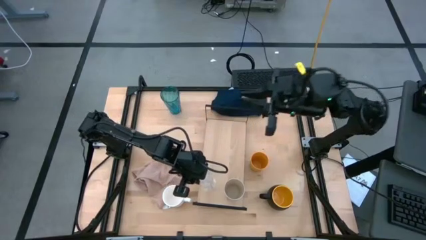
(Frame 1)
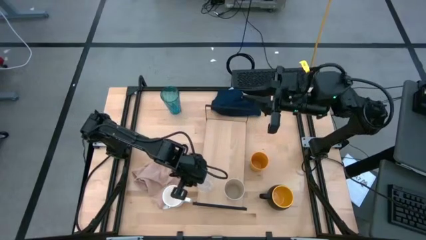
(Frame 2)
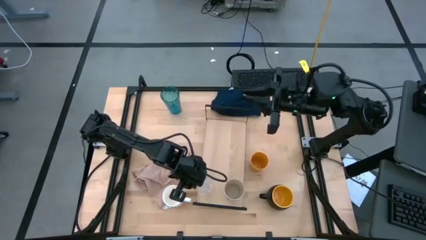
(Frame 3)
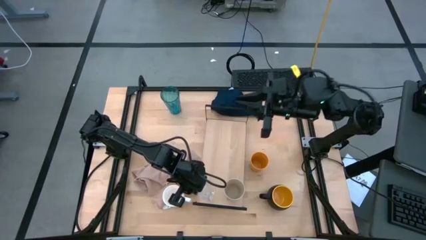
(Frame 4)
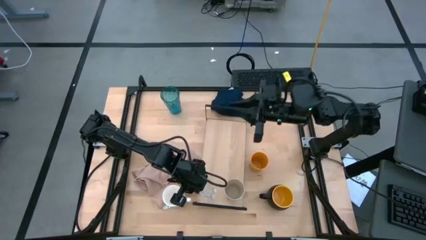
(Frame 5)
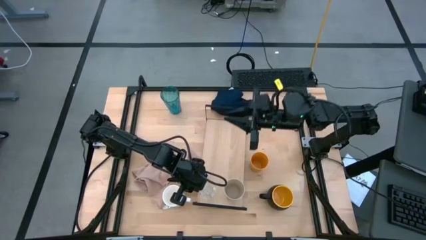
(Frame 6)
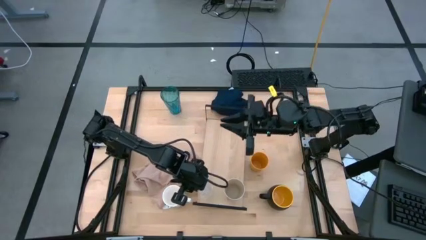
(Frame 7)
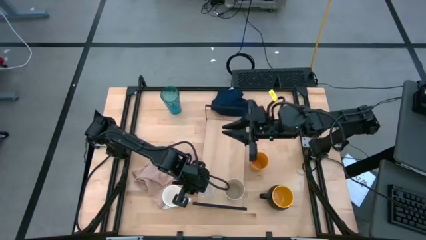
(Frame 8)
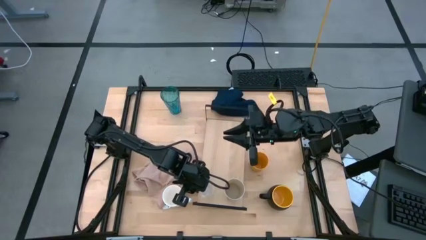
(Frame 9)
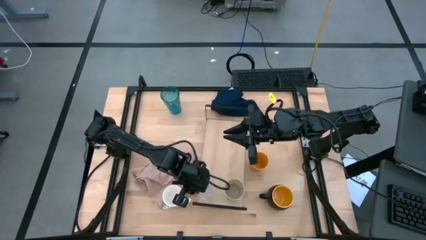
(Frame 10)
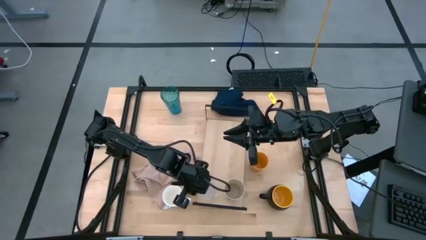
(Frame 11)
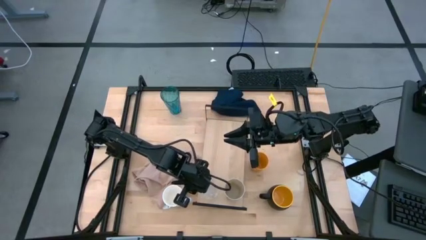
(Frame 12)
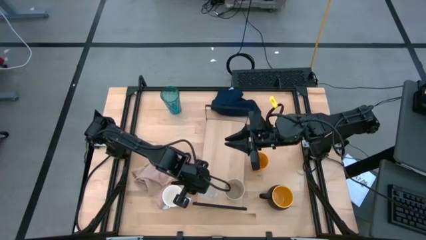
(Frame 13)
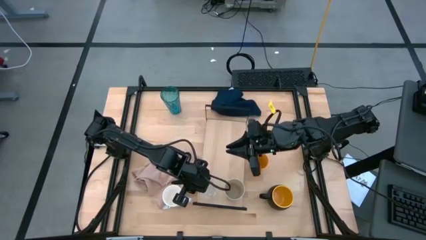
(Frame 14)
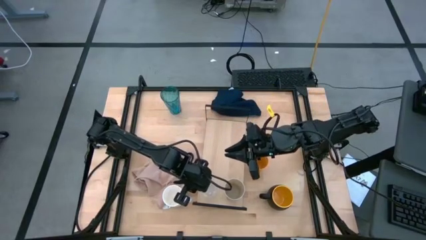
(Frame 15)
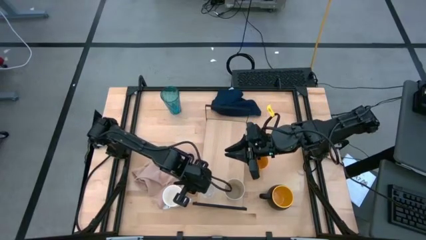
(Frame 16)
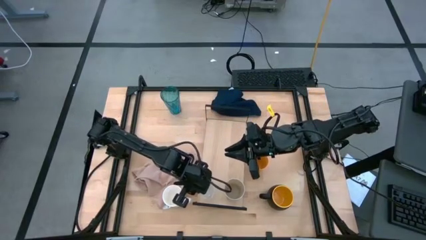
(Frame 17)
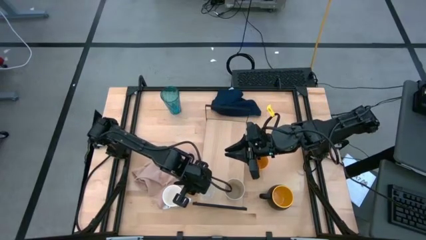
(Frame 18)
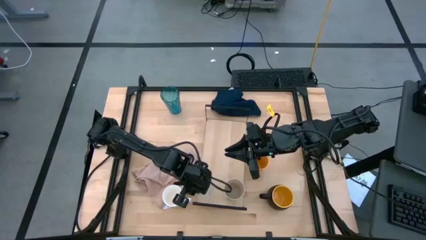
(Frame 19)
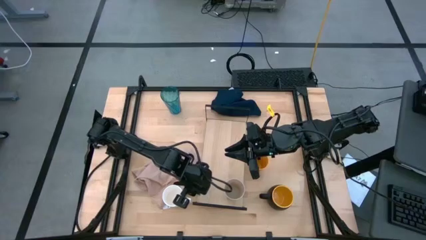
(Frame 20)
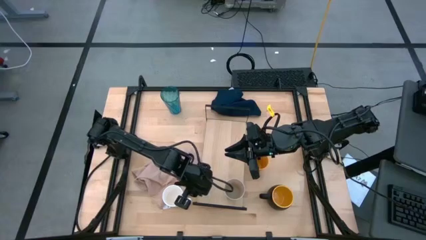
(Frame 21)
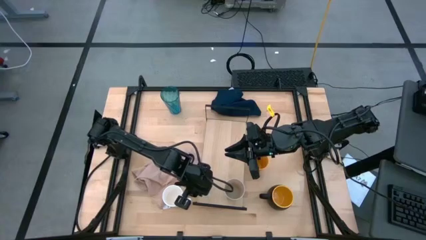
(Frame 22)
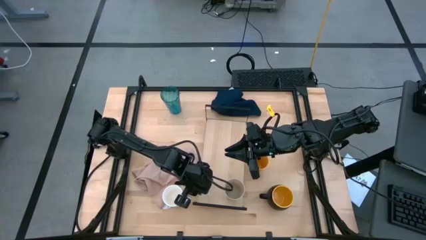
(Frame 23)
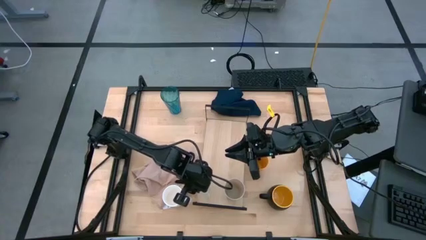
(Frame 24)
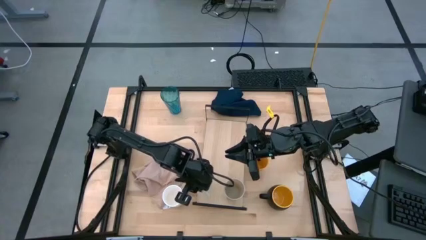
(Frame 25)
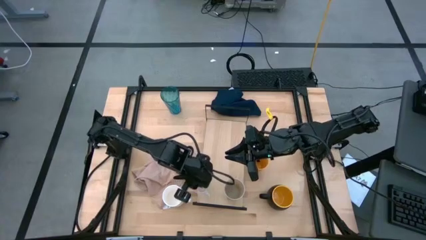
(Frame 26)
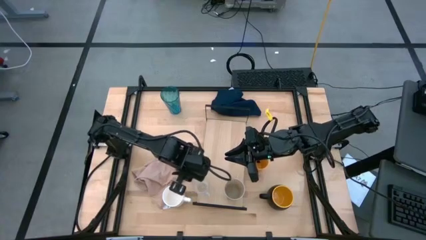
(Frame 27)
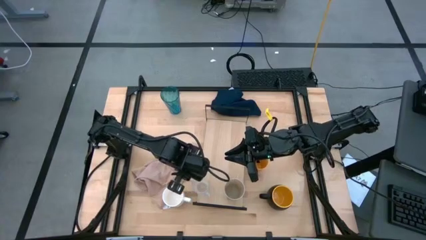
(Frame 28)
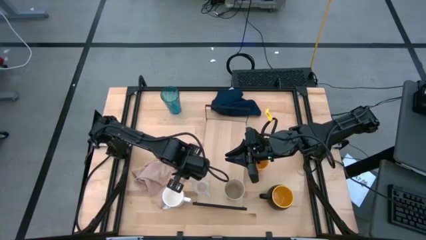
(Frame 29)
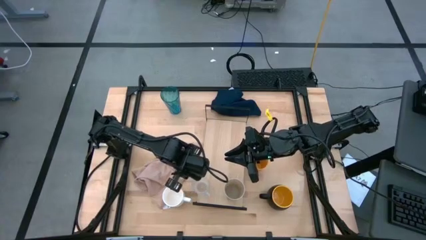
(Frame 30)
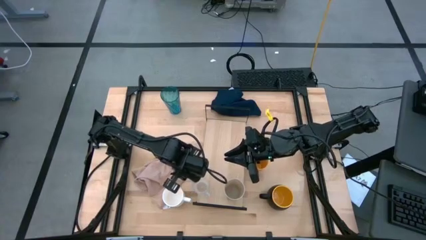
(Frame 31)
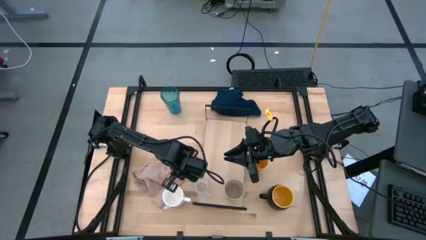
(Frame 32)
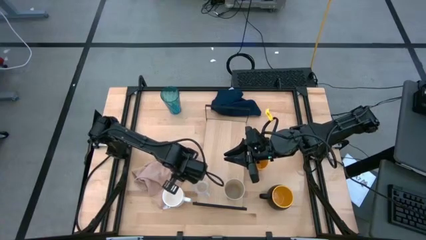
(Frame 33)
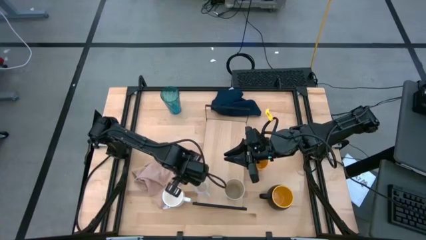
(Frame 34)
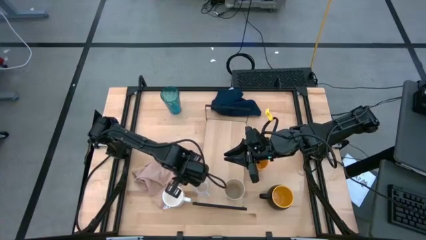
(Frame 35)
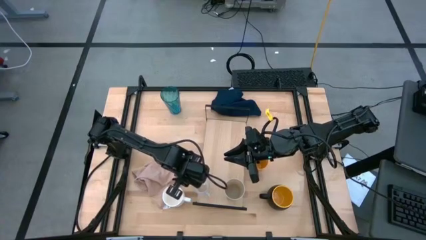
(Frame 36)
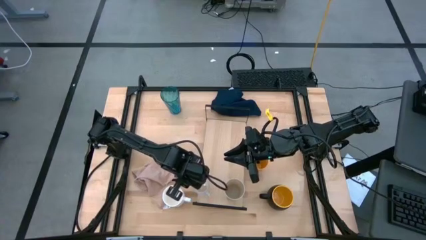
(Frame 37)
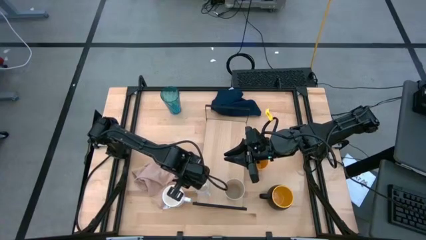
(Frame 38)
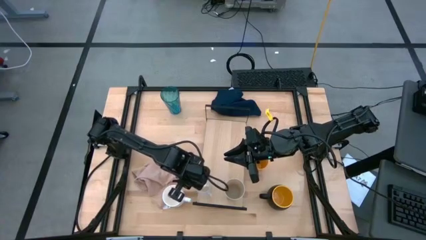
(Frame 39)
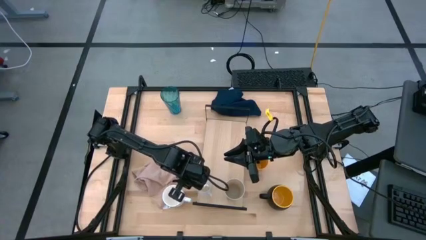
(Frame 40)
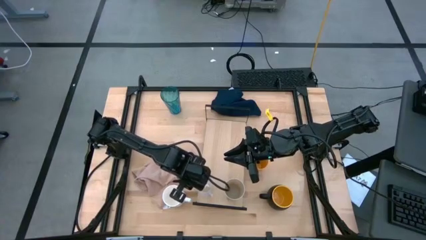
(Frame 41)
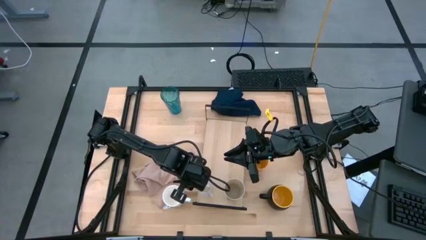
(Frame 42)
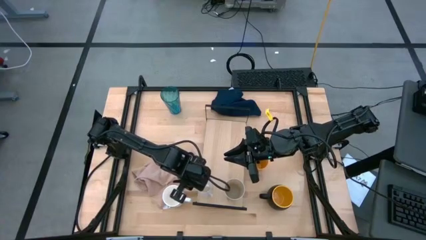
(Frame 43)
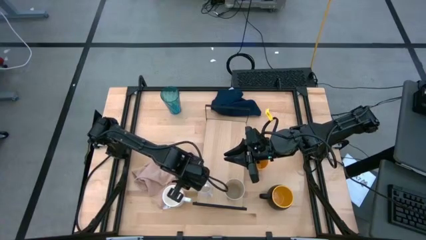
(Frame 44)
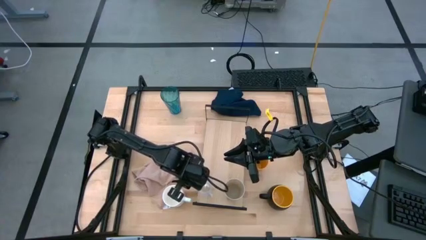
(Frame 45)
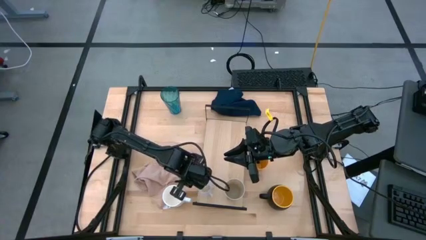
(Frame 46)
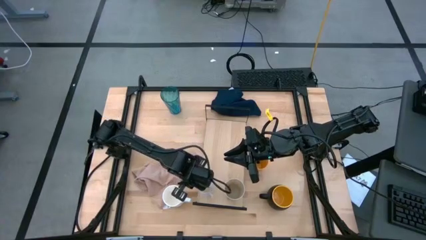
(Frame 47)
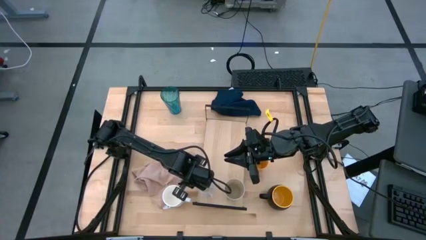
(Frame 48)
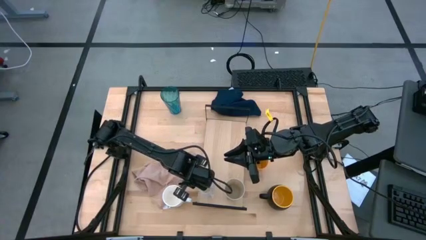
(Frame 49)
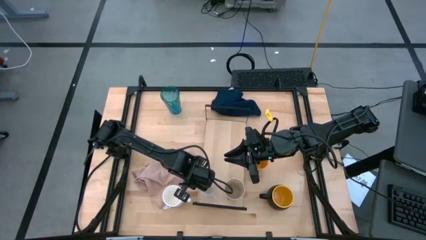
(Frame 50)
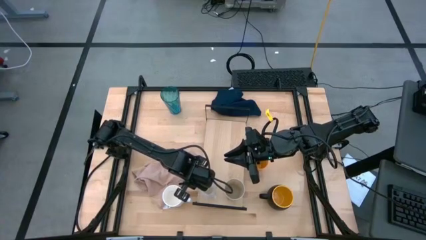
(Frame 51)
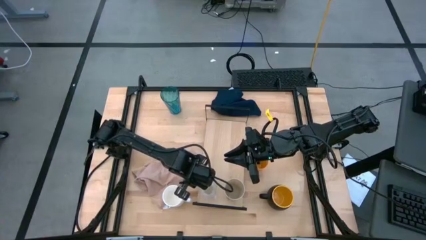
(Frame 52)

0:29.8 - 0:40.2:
Task: Stack small to large cups/mugs on shelf
Put the transparent cup on the shelf

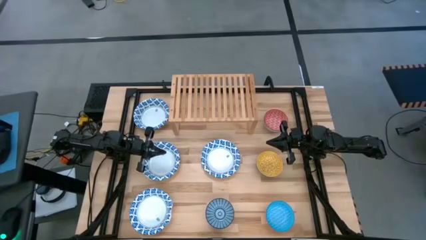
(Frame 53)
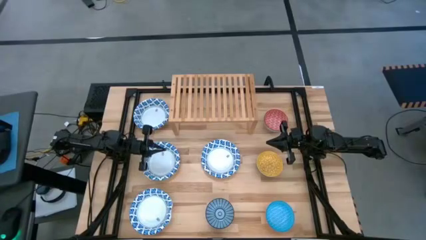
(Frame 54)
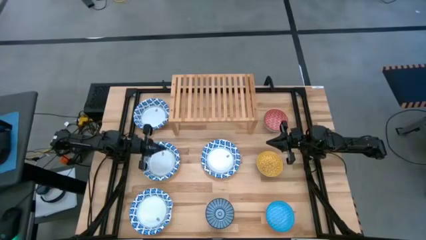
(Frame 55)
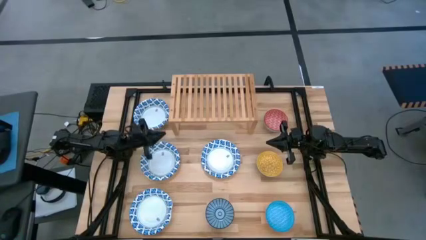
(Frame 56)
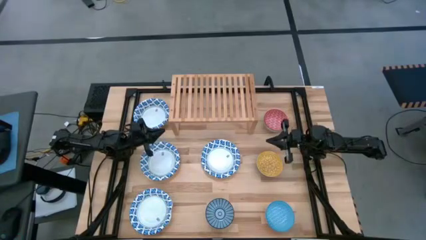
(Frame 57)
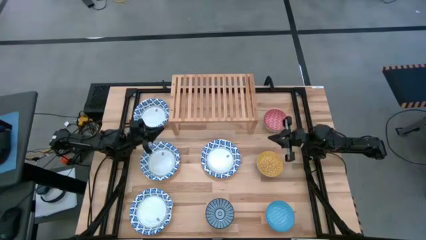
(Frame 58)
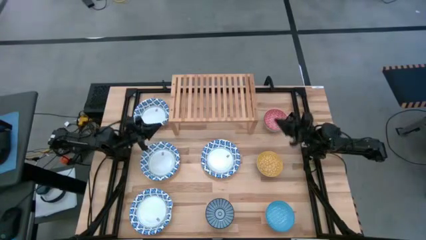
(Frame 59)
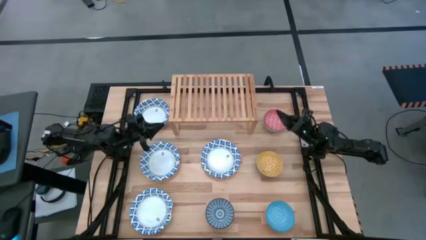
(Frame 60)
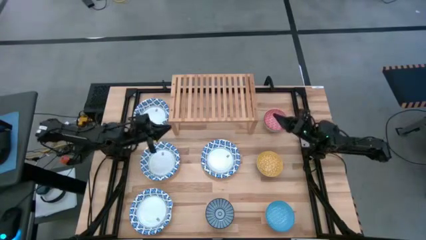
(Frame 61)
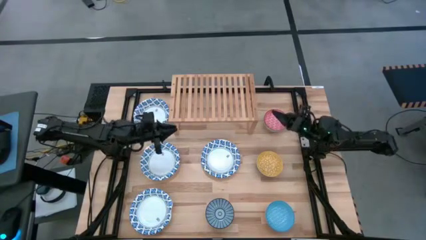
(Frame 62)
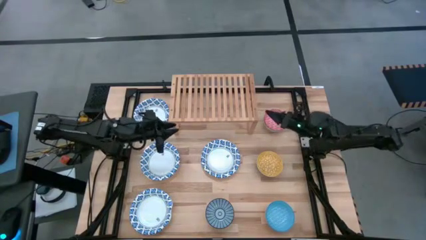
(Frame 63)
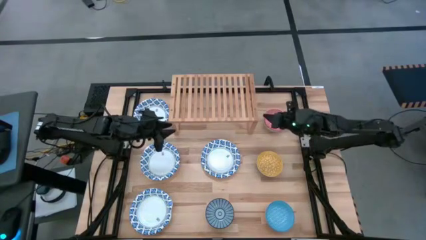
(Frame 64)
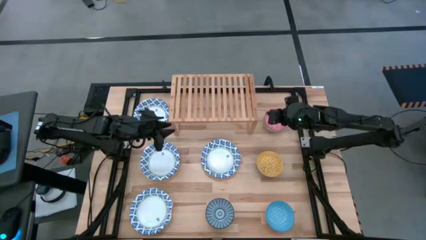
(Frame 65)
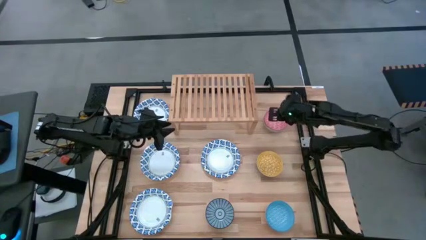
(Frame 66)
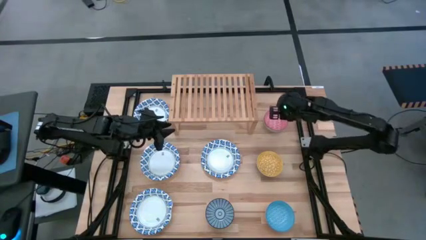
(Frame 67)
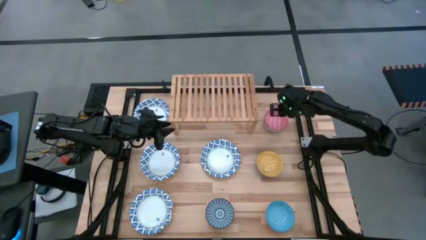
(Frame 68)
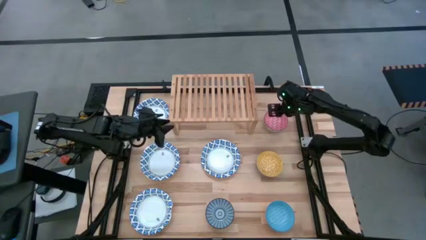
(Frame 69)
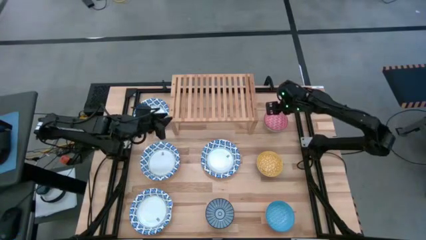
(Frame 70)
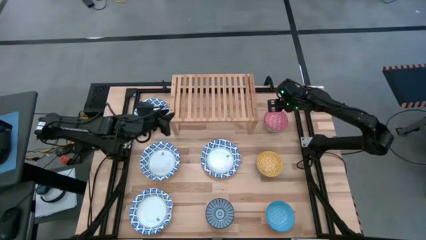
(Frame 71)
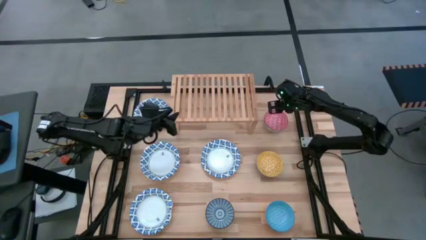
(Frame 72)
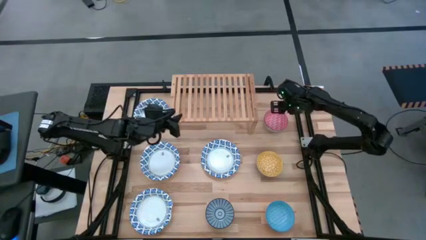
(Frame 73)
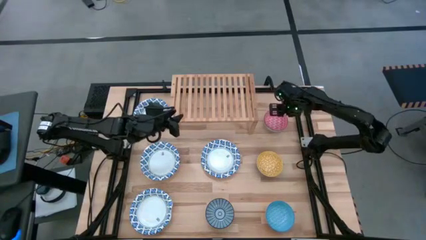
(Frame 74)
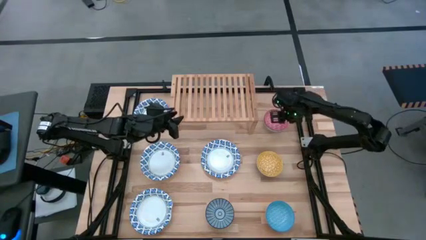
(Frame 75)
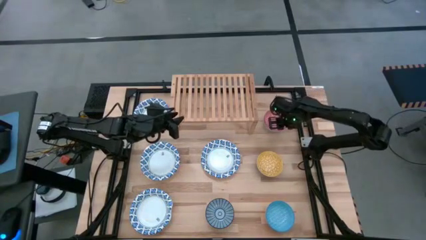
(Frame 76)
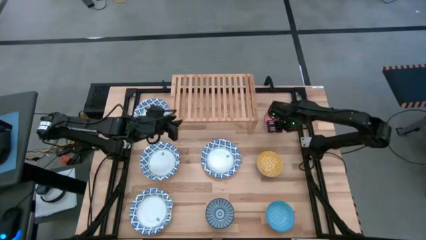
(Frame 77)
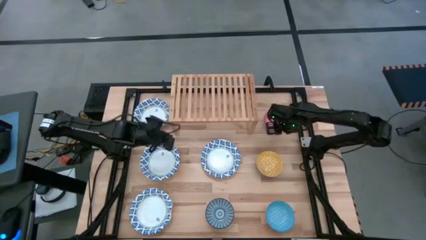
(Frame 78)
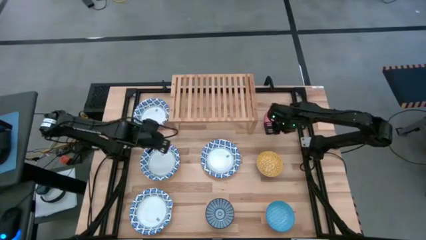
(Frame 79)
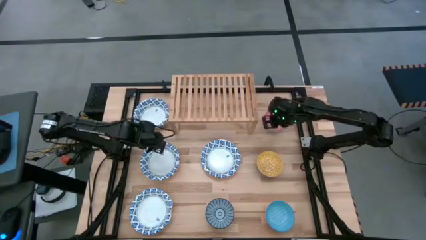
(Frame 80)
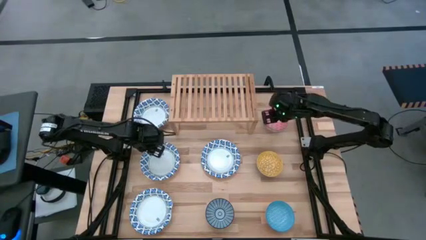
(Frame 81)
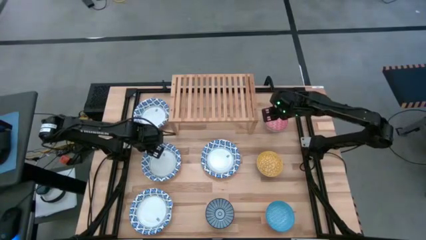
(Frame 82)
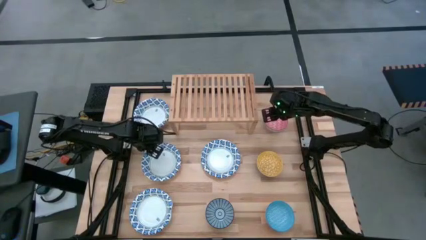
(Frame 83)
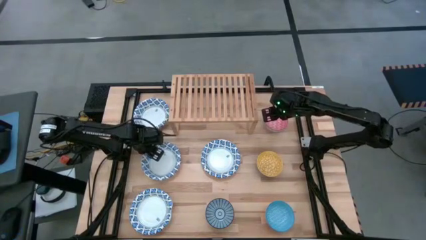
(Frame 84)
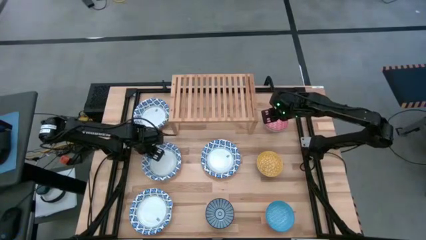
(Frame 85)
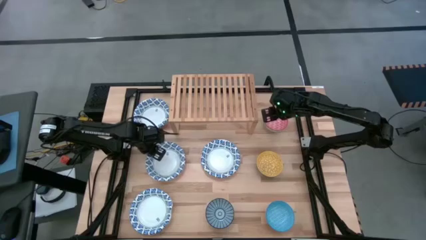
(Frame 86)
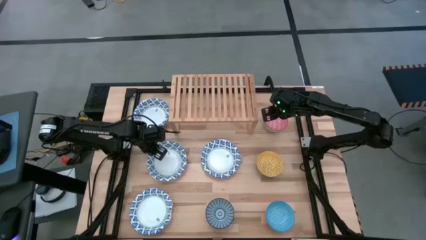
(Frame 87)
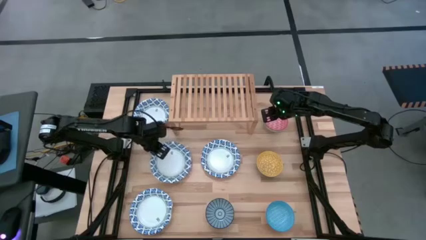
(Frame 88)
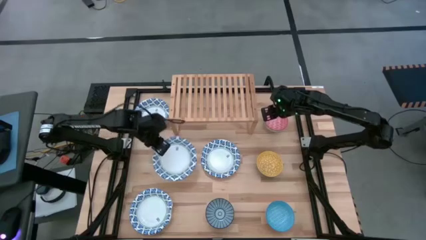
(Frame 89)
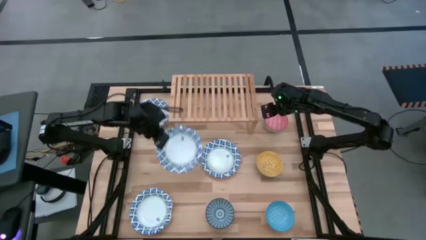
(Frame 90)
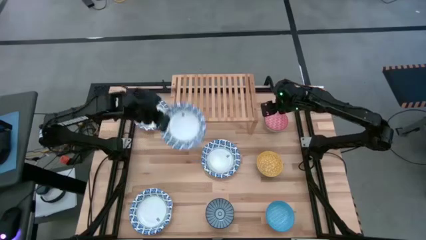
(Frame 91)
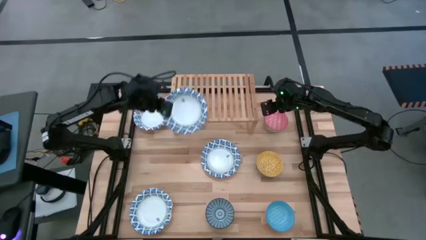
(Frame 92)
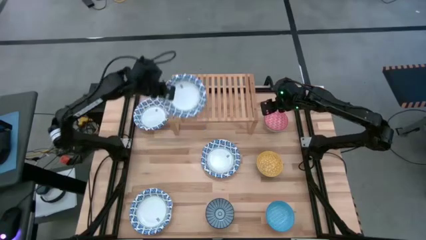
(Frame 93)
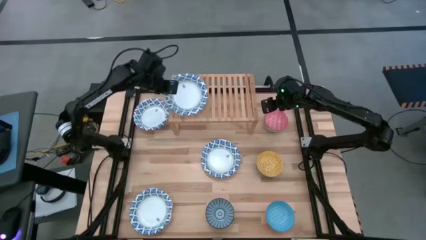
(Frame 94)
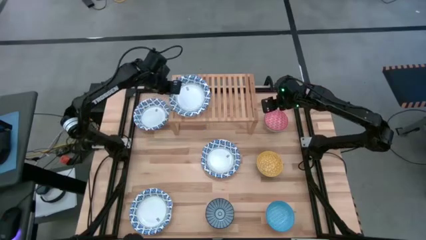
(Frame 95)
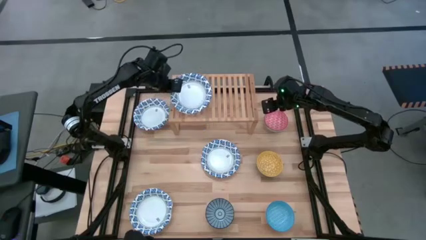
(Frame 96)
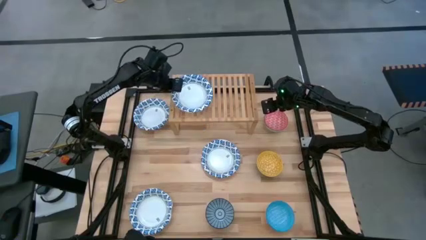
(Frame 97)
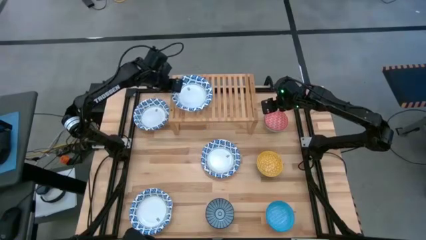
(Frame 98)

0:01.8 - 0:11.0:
Task: Place and stack bowls onto a shelf
Put the big white bowl on the shelf
